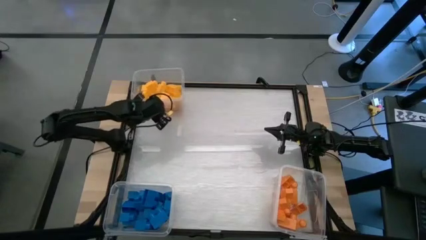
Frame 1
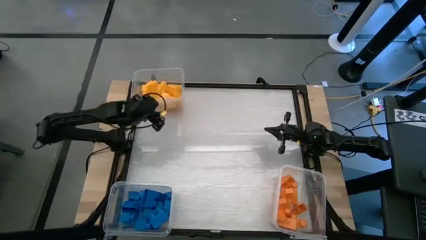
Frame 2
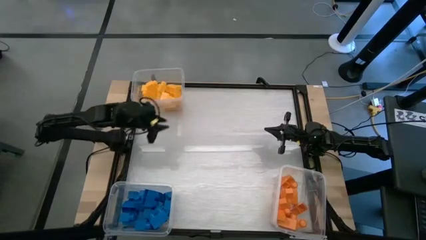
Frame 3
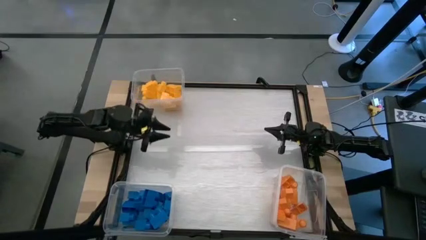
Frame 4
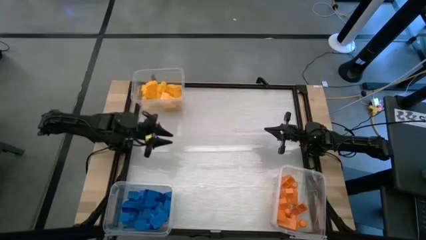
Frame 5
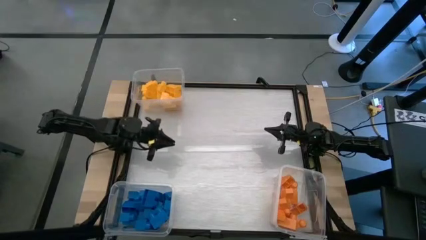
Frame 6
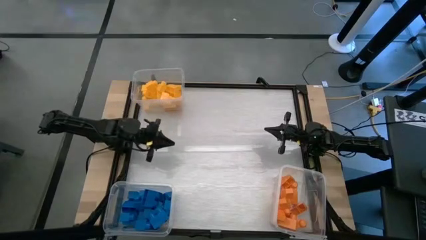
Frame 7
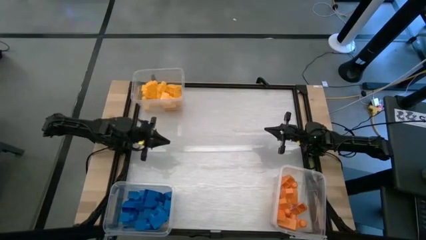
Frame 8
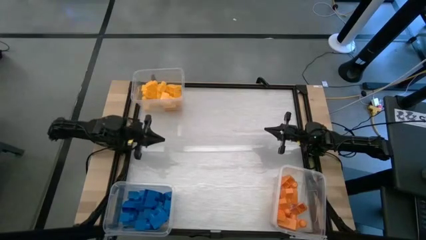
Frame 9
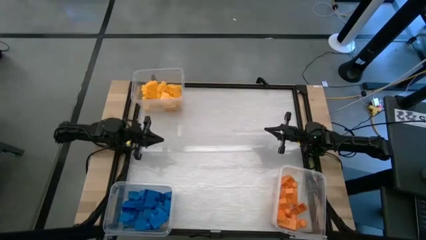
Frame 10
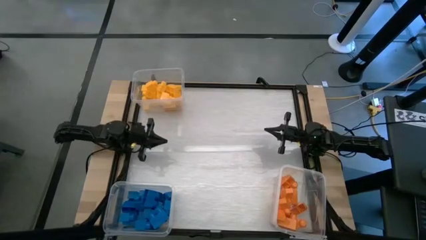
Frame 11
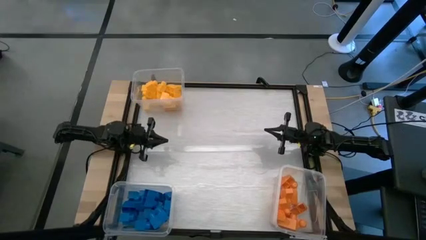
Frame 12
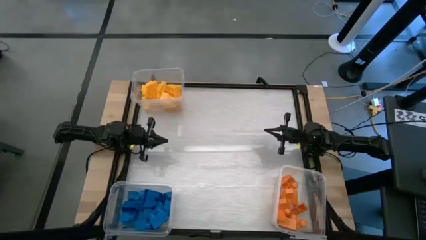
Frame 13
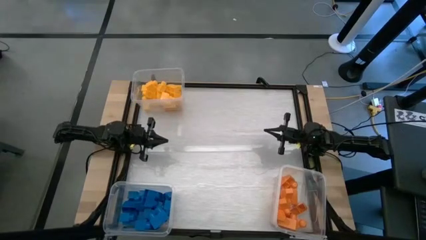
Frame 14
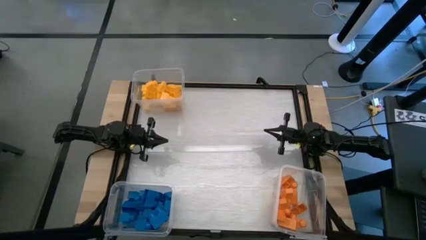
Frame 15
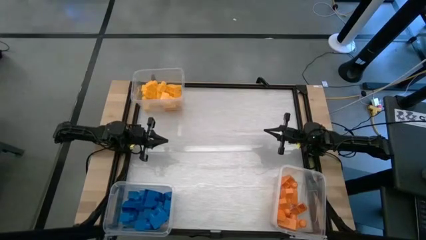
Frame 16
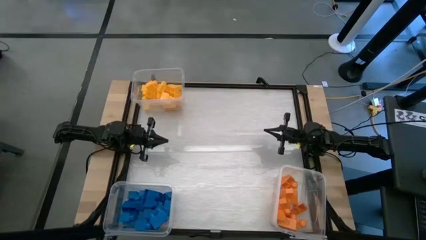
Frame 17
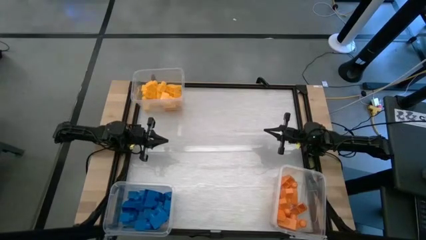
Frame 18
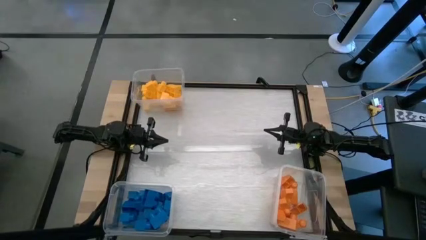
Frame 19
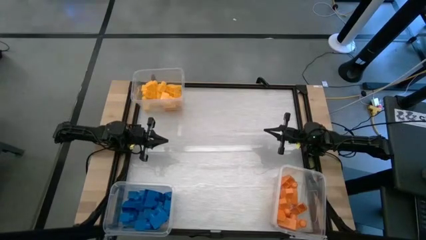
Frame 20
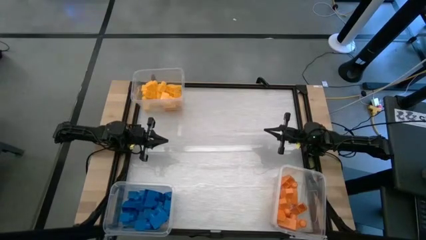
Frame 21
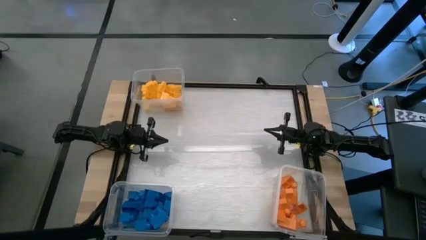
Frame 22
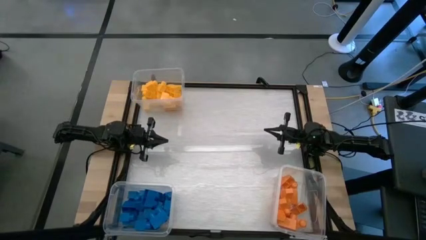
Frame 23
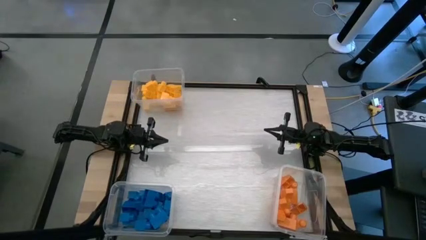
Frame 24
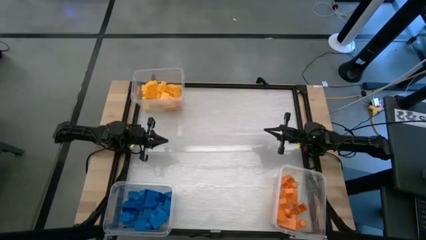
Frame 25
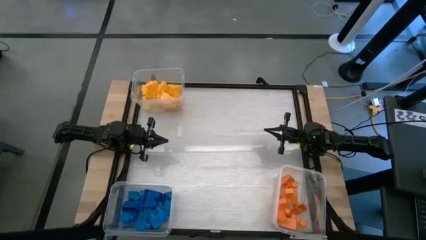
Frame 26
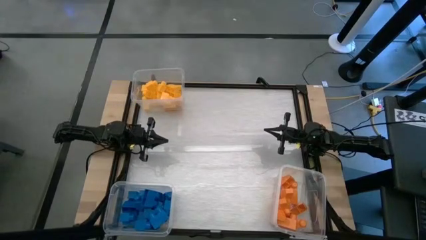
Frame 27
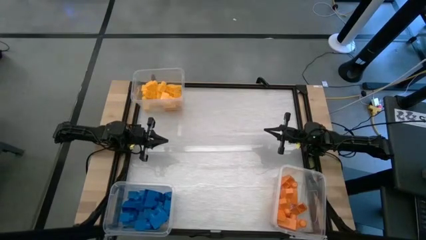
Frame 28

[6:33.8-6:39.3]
Task: Sort blocks
Return to Home Position

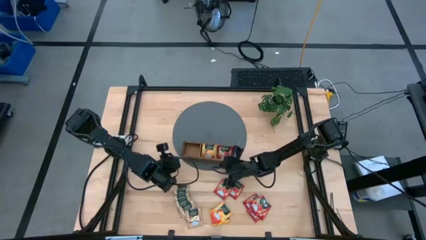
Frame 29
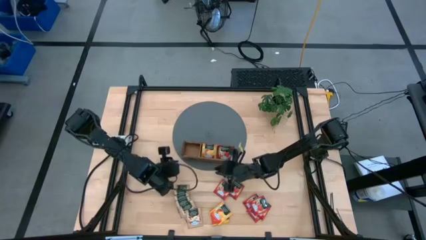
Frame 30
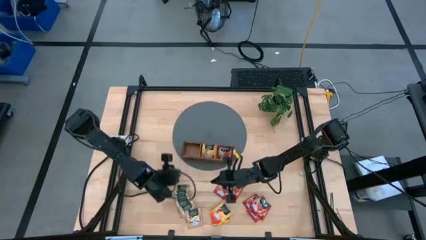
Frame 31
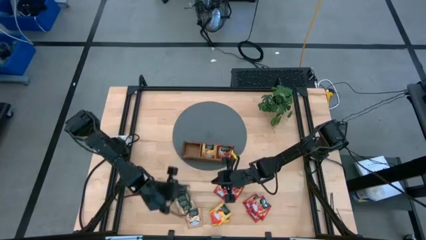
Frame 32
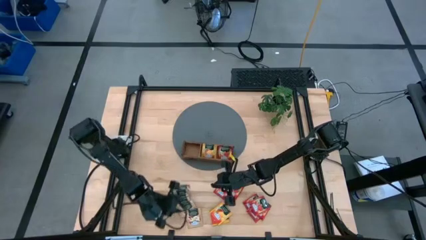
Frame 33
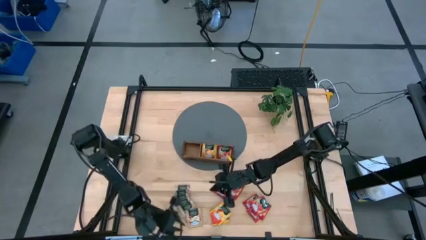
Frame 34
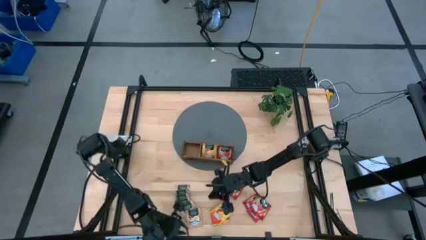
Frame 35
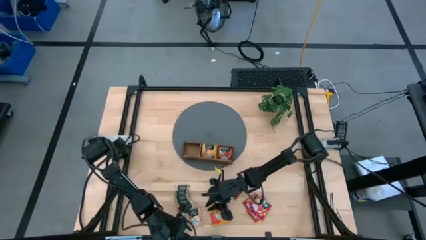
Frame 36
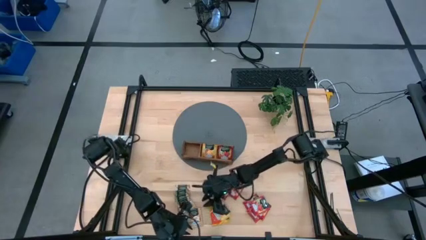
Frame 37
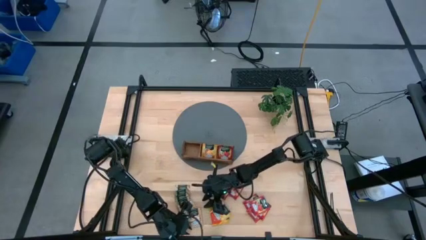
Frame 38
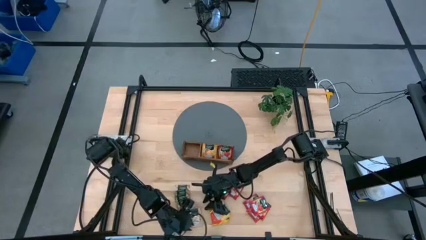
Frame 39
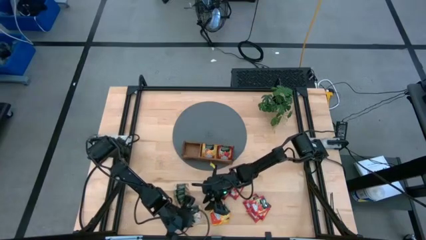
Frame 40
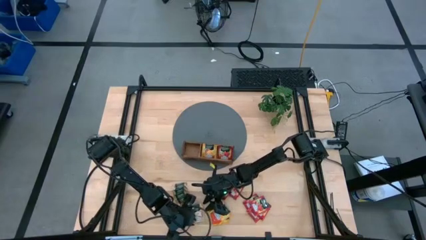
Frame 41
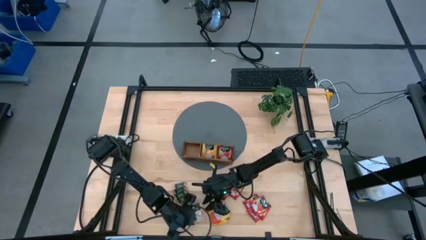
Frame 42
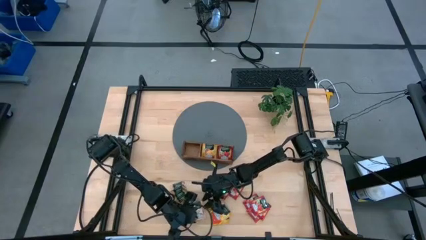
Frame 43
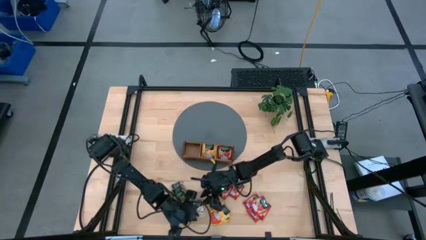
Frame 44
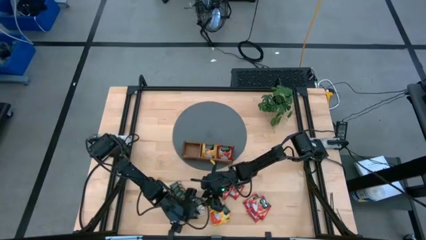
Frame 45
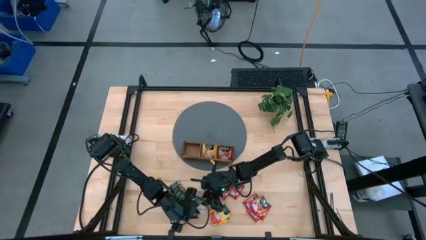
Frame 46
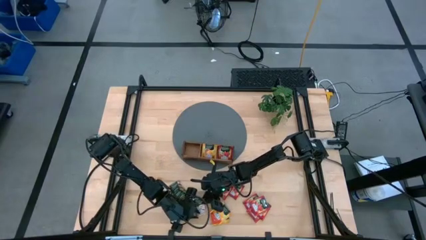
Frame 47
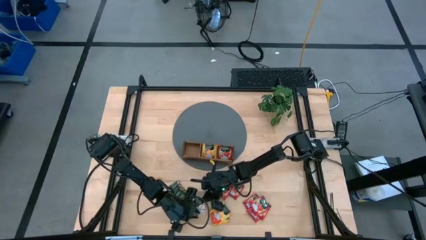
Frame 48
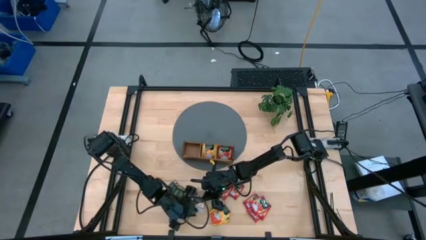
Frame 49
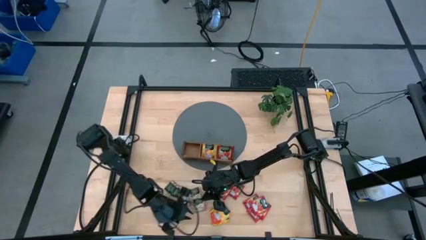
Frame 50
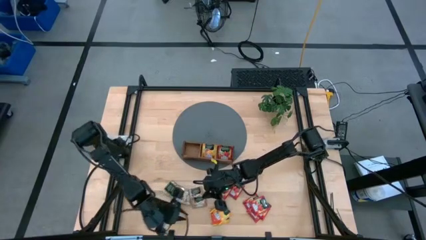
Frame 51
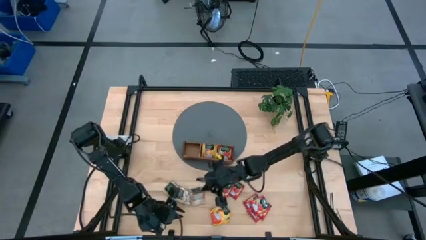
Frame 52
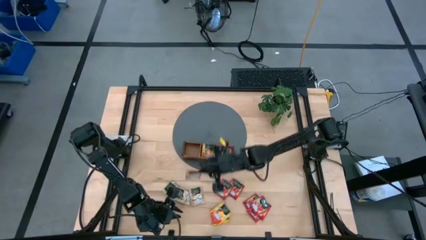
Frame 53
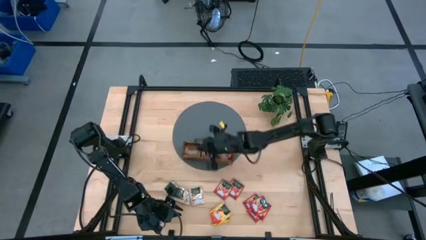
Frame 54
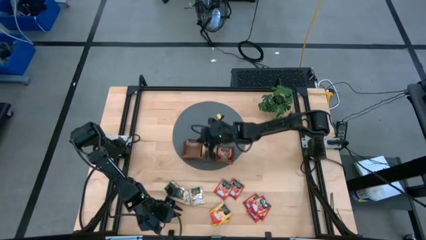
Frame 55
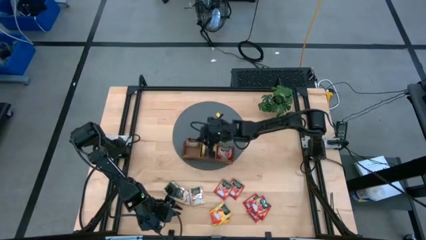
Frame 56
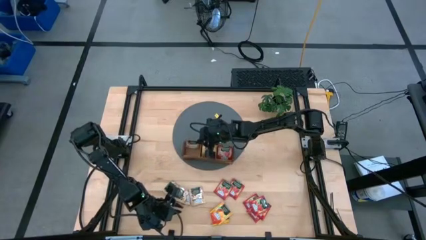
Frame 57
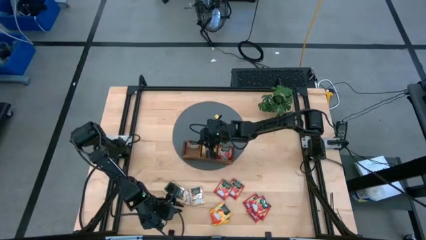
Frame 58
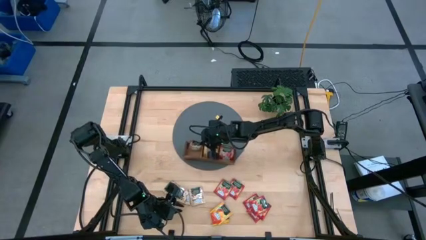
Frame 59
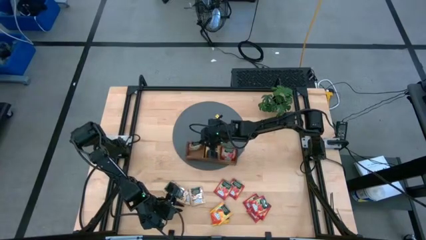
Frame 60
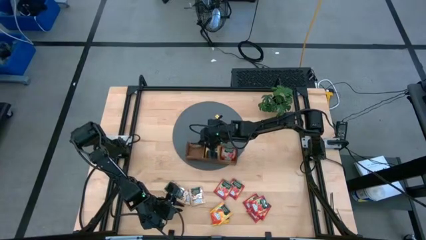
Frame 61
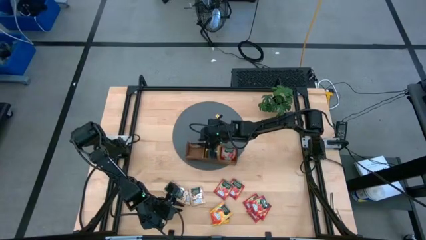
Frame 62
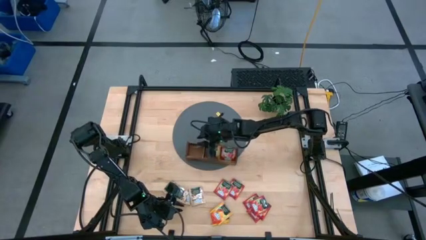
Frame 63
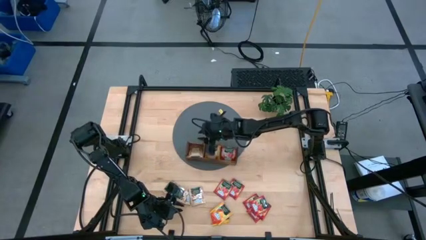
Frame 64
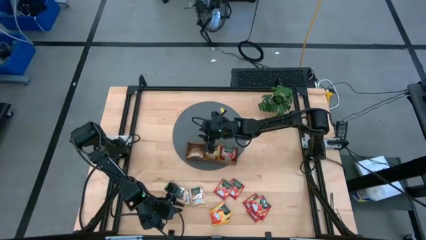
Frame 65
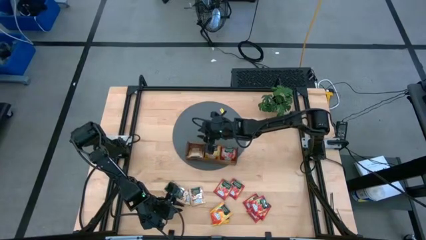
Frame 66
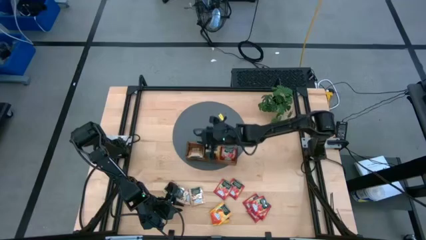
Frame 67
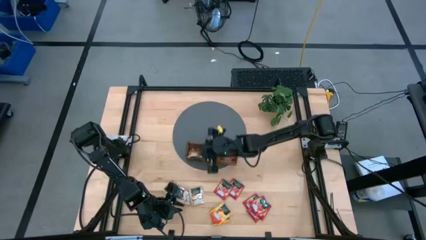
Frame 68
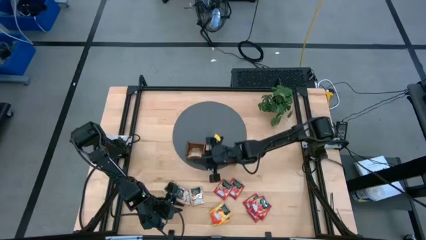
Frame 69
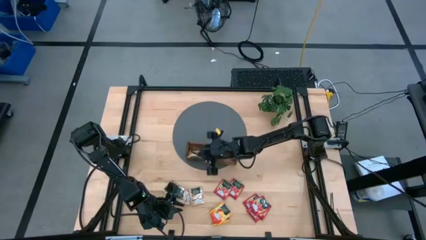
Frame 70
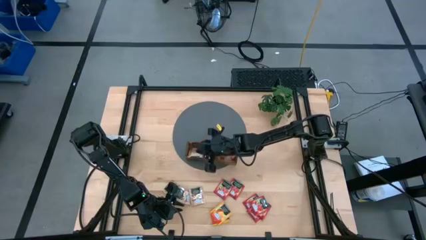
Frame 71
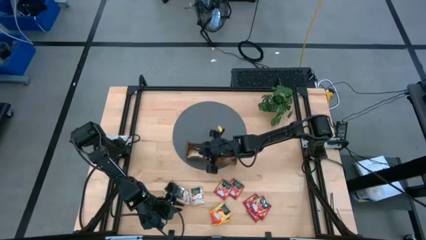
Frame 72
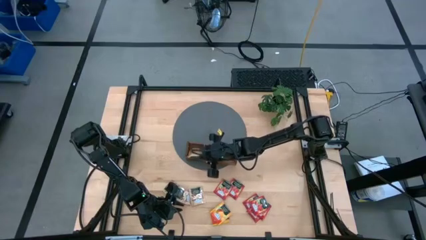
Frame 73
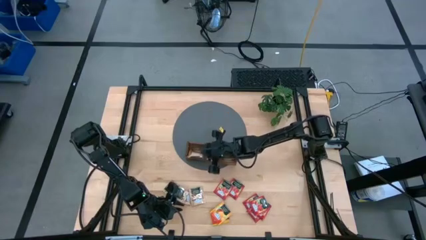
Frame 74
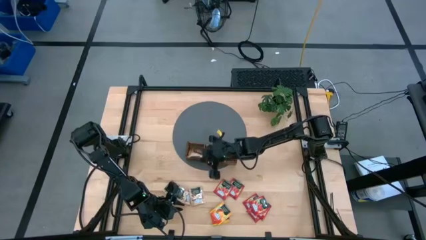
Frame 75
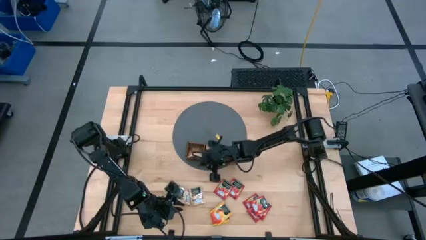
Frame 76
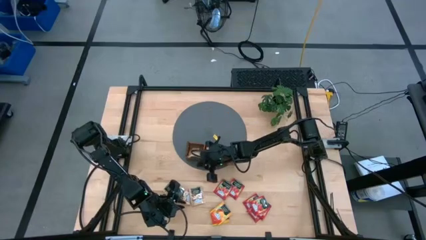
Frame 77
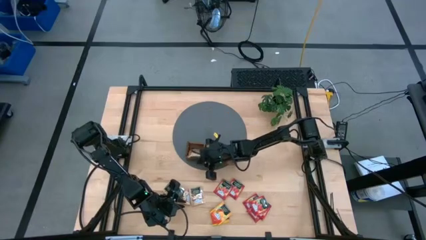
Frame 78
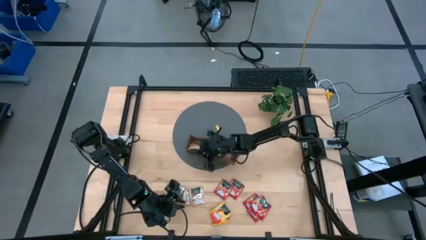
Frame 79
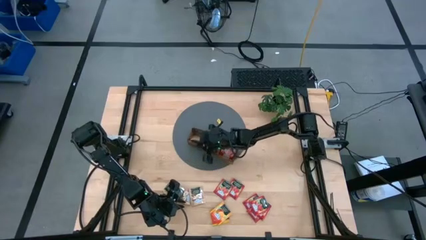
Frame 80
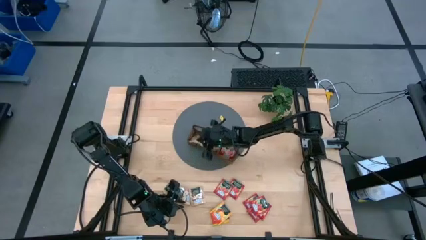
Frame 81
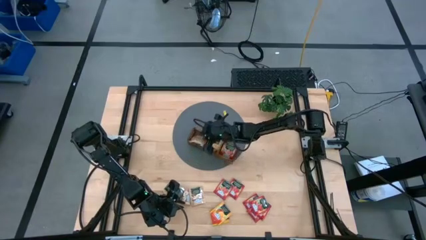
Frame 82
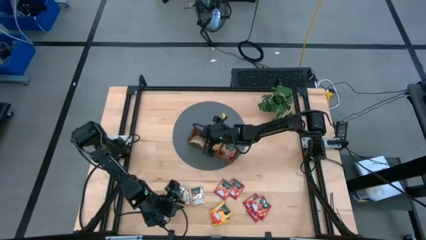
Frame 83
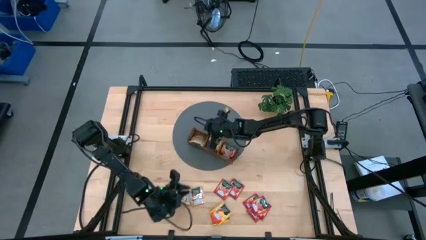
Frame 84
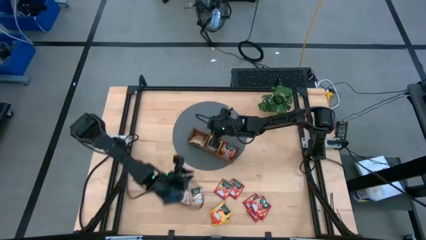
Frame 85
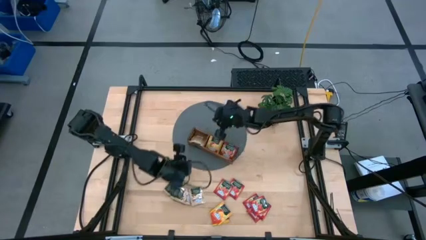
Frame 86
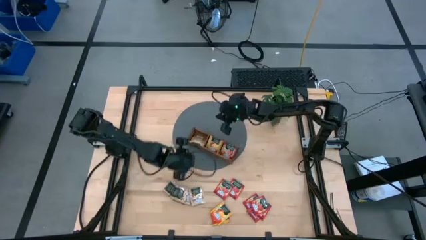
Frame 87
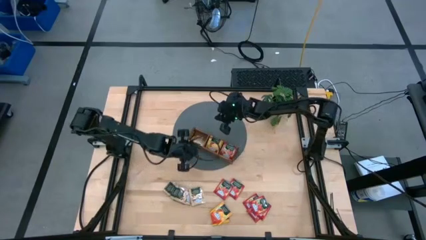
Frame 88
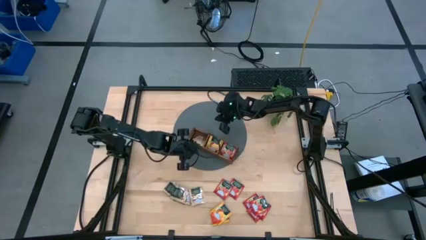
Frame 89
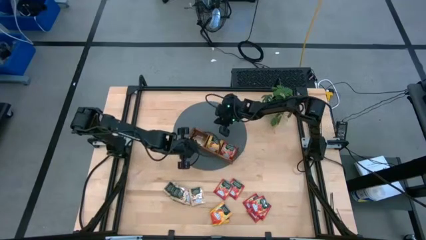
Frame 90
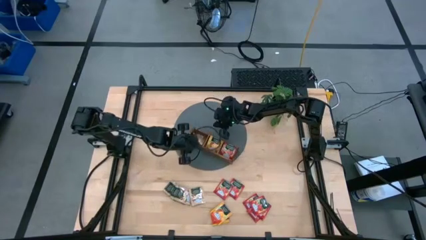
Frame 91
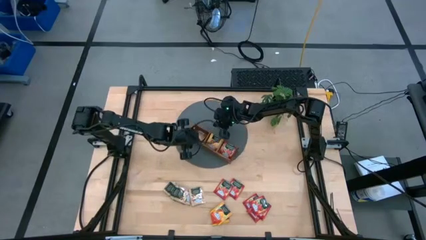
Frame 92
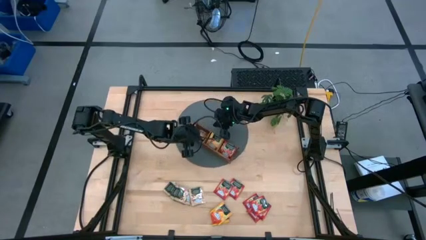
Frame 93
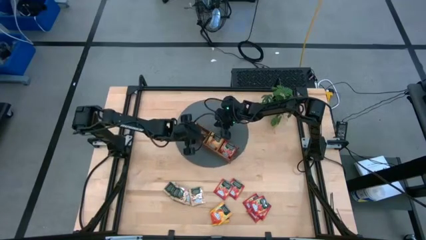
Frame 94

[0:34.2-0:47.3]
Task: Pick & Place Tea
Put the brown tea bag into the left section of the wooden organizer
